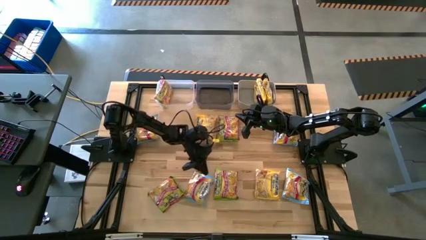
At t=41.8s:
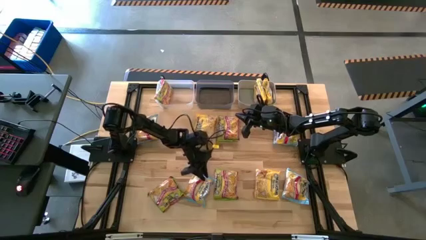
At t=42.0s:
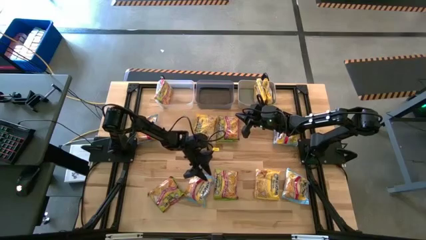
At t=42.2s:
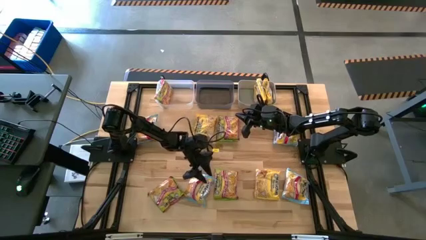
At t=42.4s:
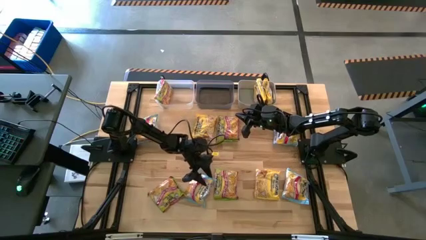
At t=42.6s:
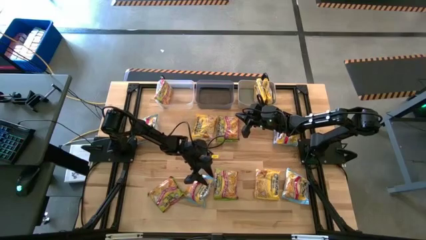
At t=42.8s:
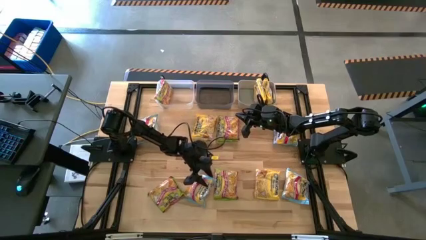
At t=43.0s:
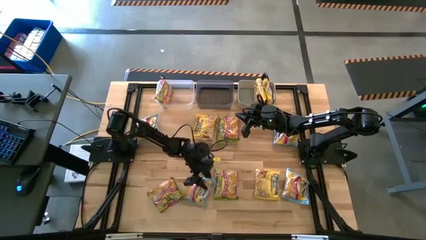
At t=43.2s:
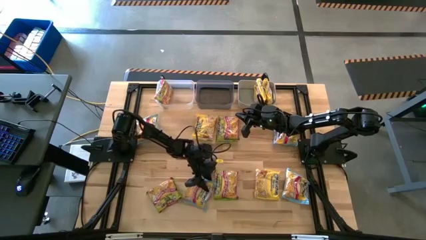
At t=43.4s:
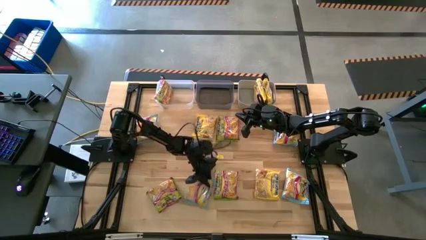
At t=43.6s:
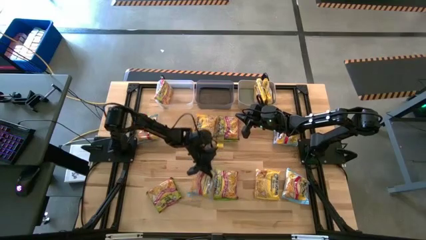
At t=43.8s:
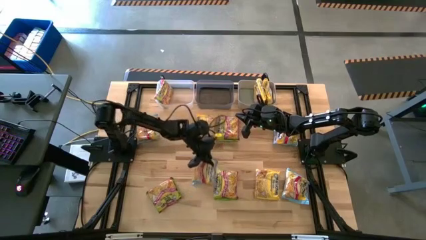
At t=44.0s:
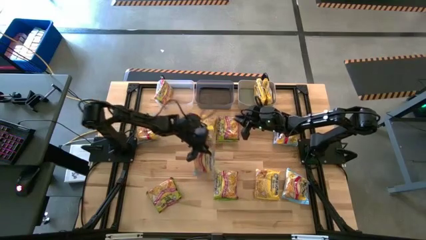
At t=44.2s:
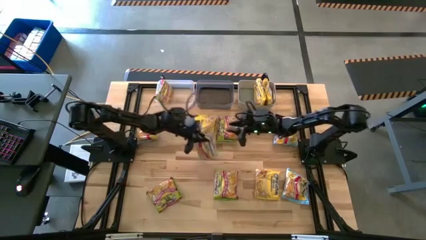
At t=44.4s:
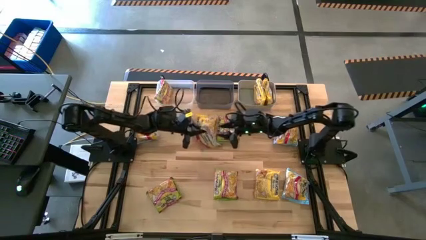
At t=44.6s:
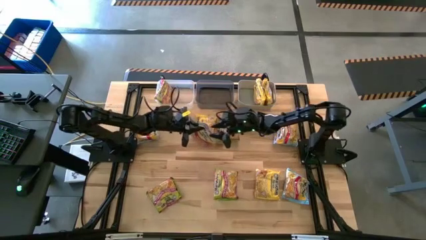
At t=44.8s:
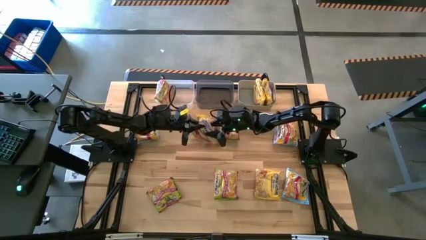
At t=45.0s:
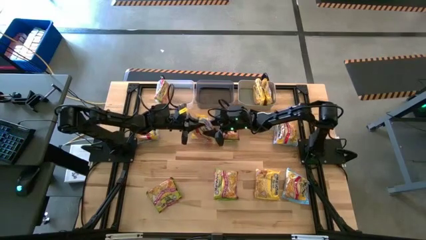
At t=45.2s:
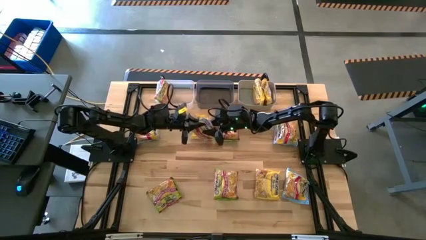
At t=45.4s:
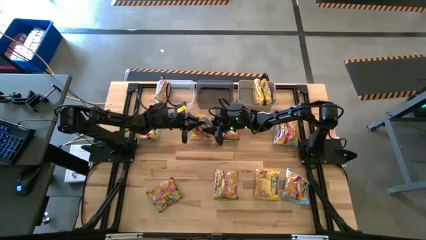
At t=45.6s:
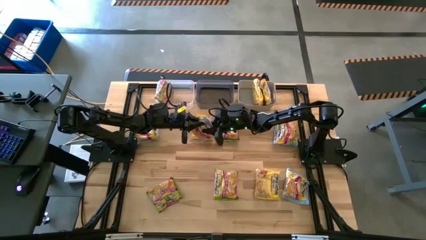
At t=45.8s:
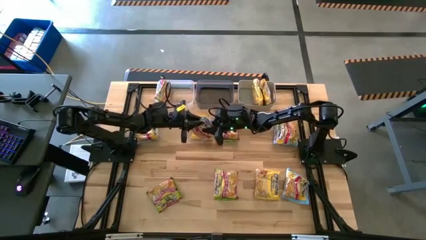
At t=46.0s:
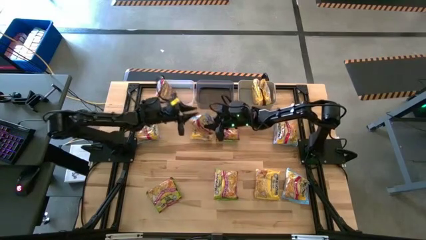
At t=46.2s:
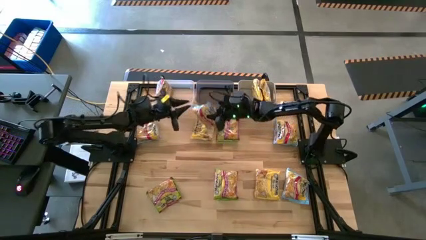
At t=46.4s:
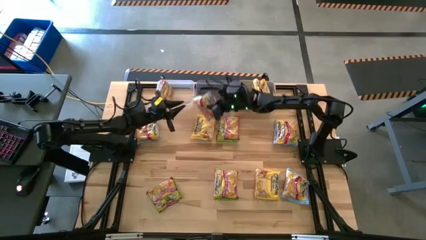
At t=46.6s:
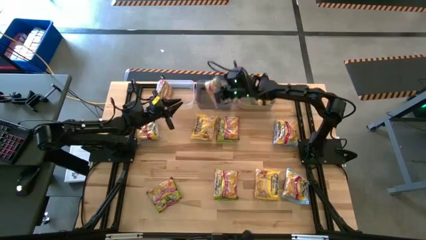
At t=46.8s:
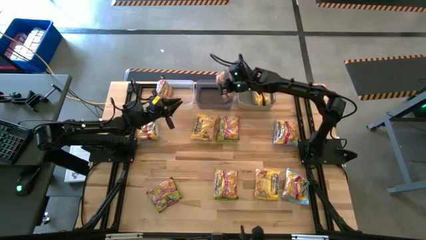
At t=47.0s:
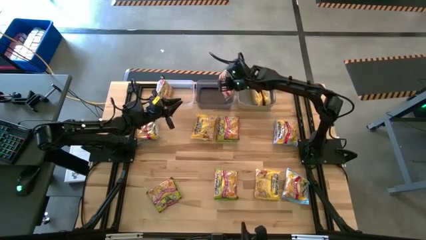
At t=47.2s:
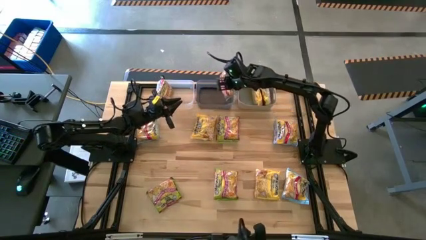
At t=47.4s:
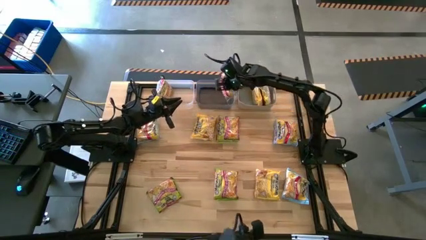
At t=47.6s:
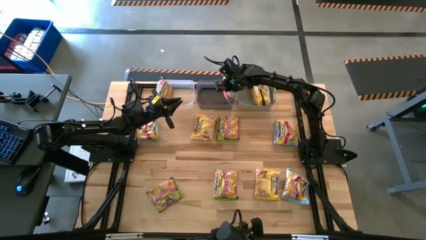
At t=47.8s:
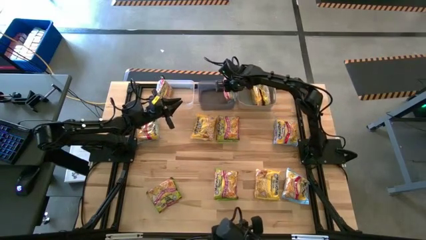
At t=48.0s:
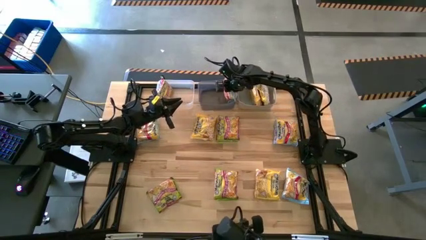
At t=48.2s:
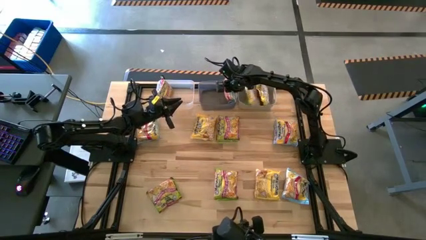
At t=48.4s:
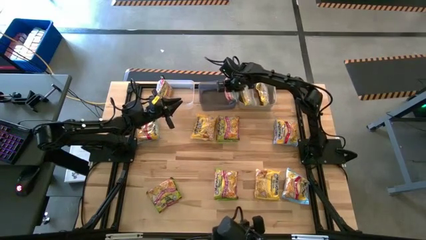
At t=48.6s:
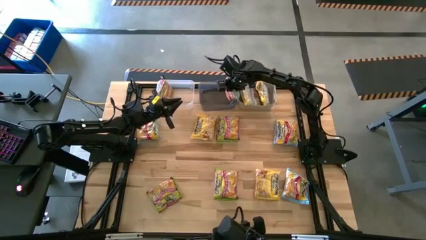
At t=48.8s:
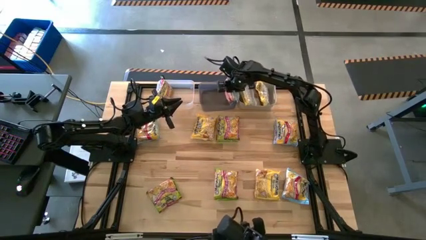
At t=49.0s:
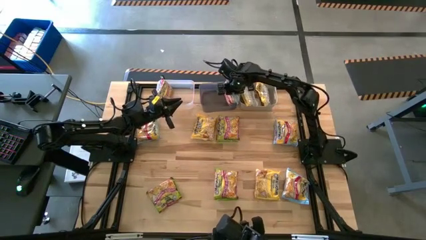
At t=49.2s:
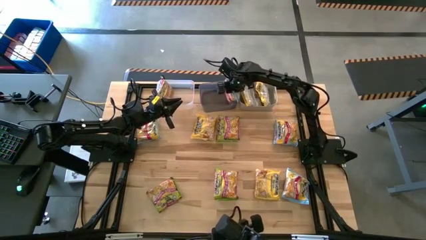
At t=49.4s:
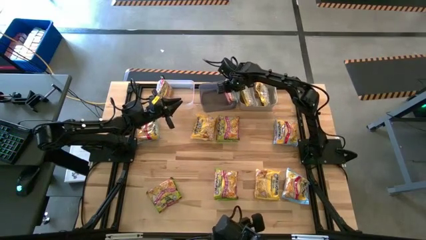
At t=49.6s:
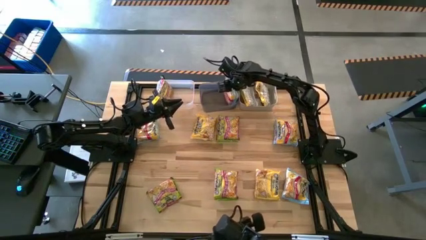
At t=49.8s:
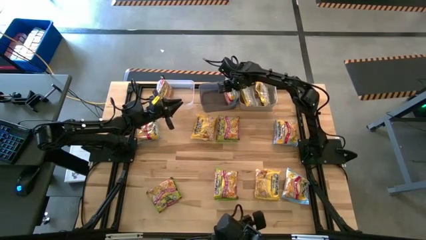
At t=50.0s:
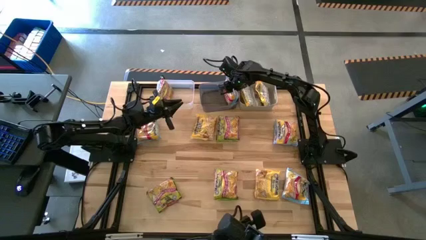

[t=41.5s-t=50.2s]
Task: Sort Maruchan noodles
Put the bottom left blue noodle pack into the black bin

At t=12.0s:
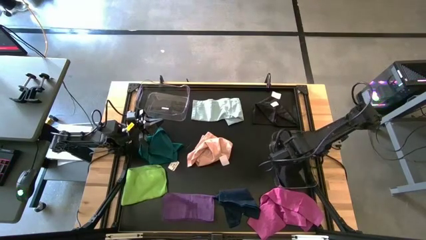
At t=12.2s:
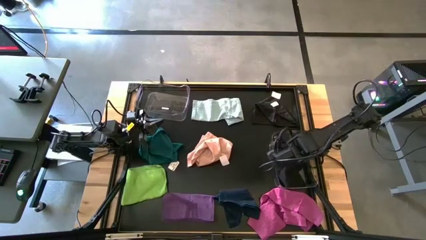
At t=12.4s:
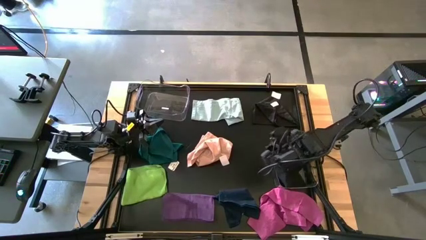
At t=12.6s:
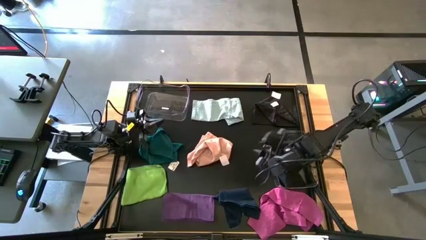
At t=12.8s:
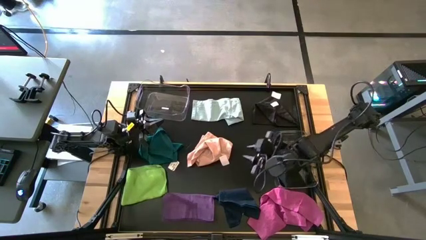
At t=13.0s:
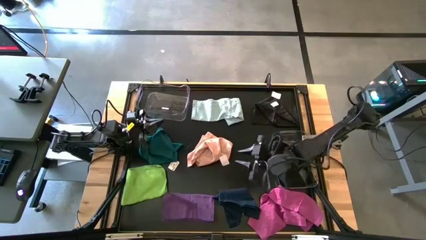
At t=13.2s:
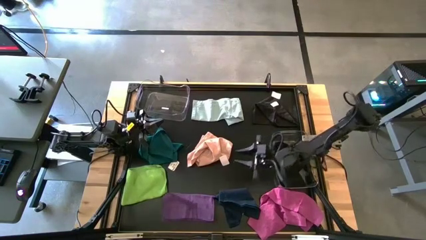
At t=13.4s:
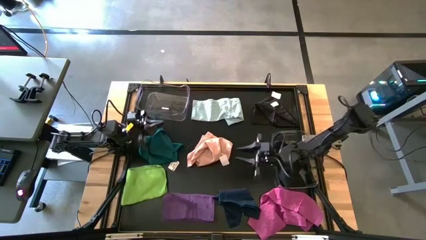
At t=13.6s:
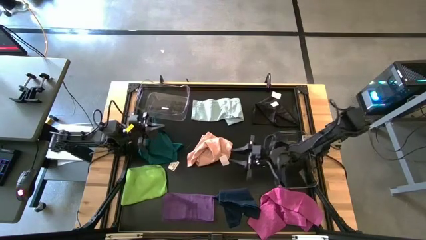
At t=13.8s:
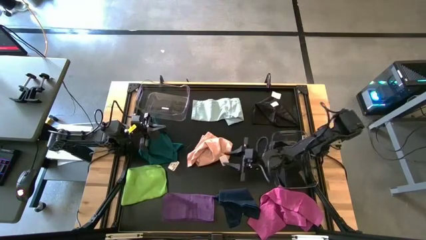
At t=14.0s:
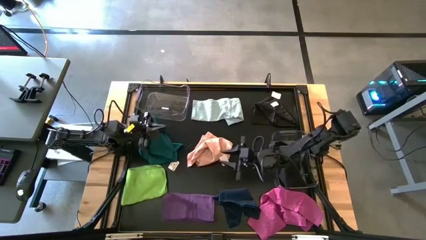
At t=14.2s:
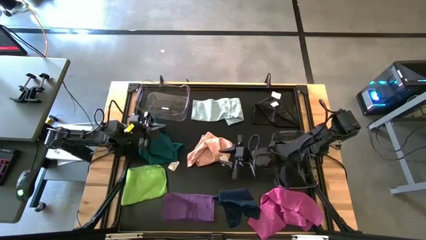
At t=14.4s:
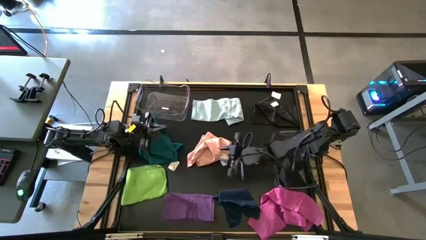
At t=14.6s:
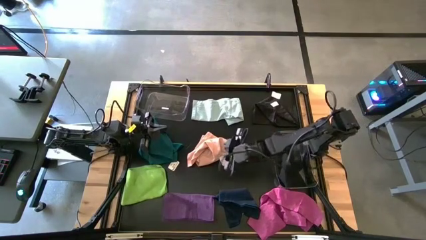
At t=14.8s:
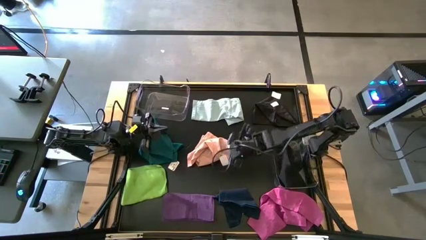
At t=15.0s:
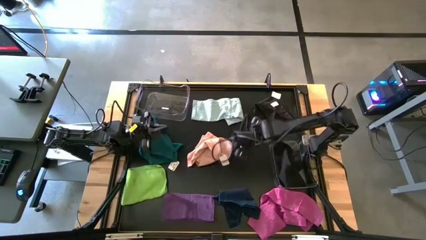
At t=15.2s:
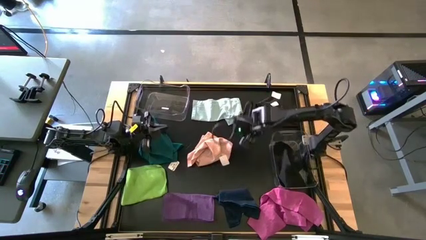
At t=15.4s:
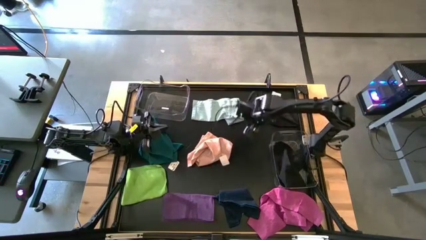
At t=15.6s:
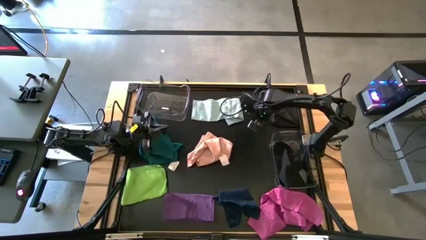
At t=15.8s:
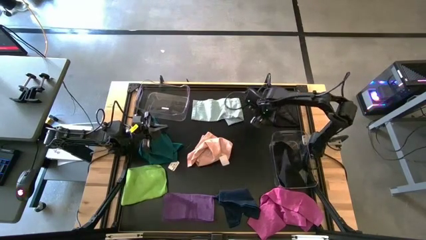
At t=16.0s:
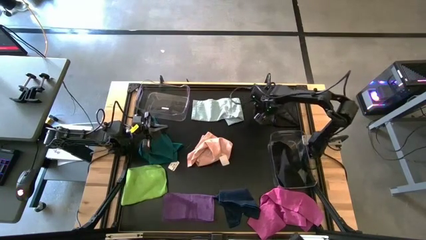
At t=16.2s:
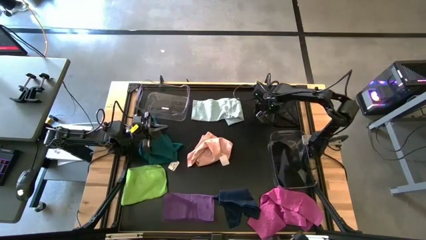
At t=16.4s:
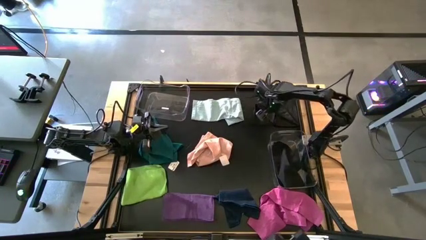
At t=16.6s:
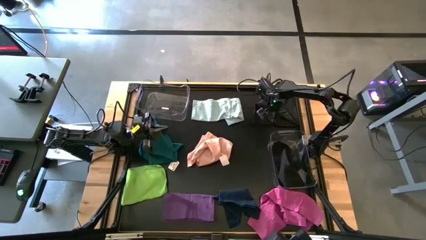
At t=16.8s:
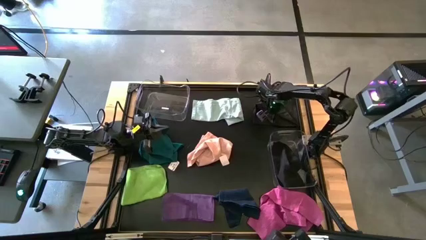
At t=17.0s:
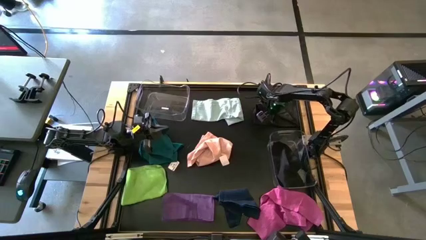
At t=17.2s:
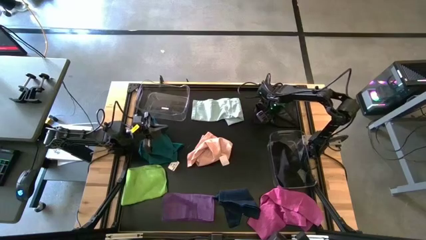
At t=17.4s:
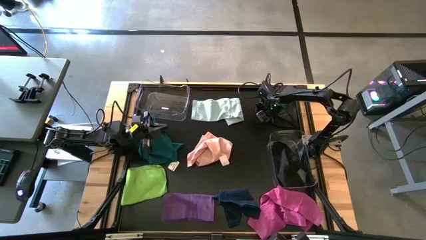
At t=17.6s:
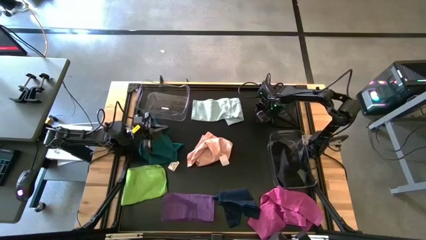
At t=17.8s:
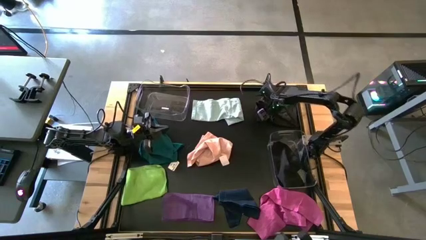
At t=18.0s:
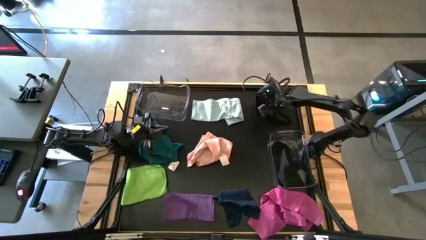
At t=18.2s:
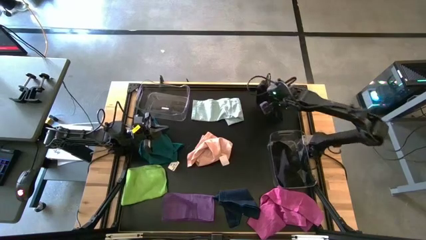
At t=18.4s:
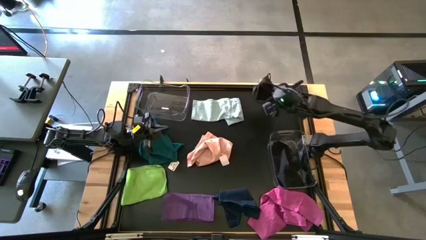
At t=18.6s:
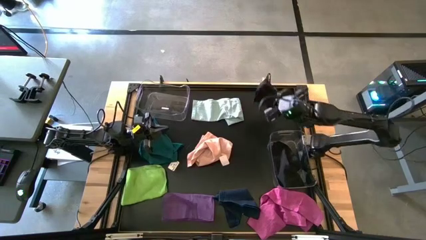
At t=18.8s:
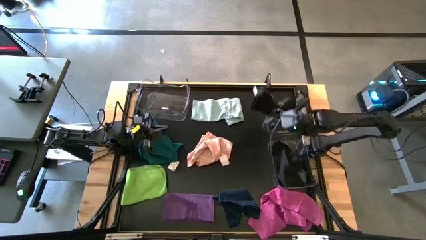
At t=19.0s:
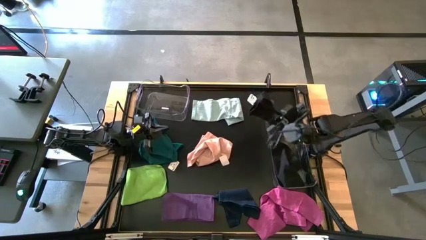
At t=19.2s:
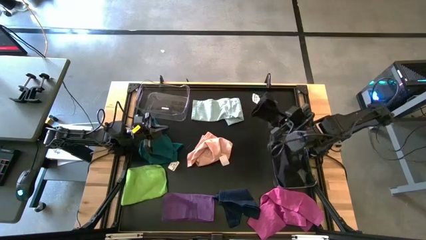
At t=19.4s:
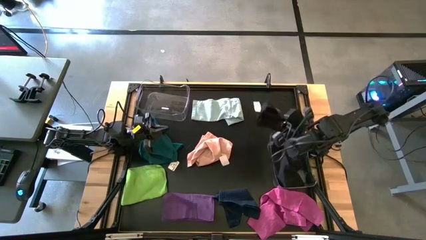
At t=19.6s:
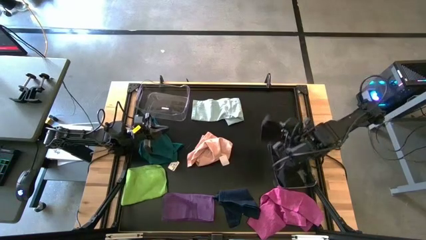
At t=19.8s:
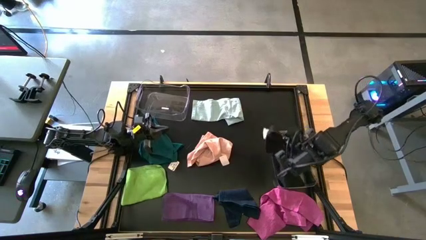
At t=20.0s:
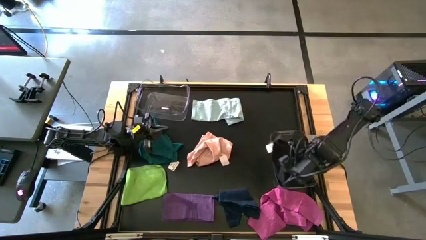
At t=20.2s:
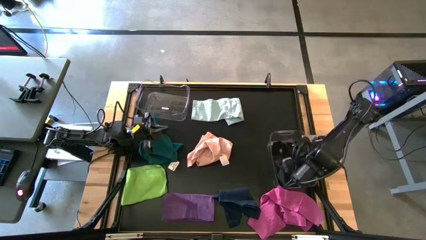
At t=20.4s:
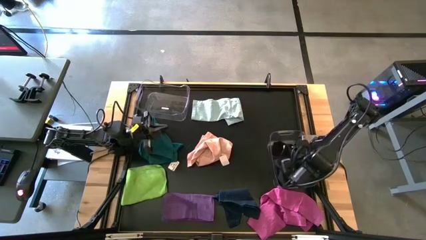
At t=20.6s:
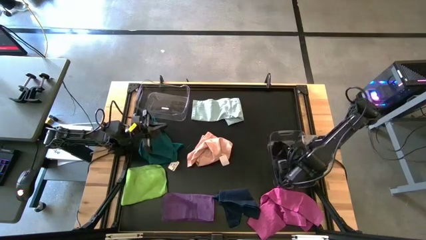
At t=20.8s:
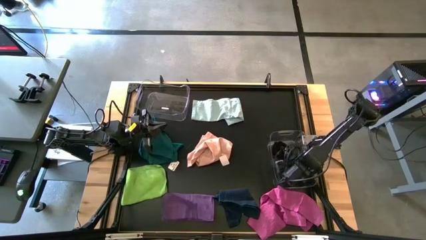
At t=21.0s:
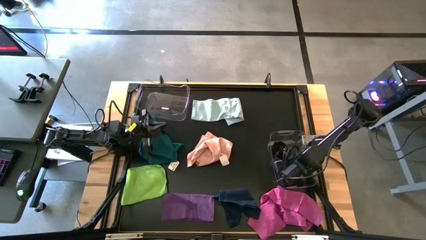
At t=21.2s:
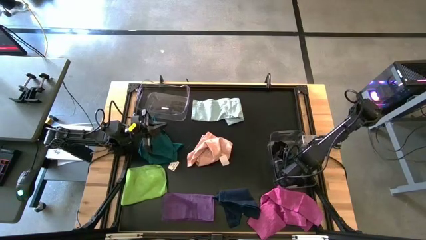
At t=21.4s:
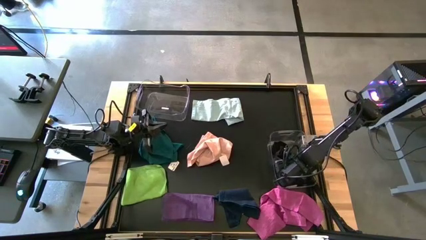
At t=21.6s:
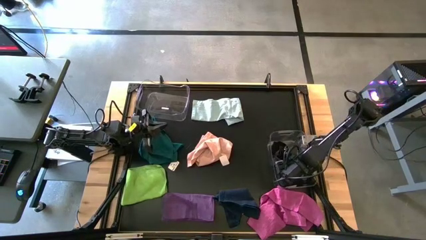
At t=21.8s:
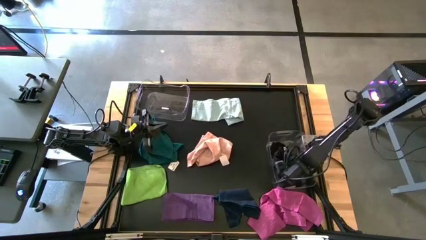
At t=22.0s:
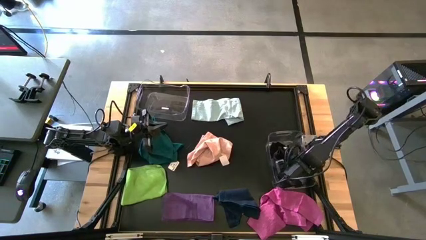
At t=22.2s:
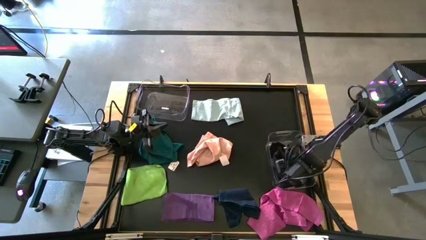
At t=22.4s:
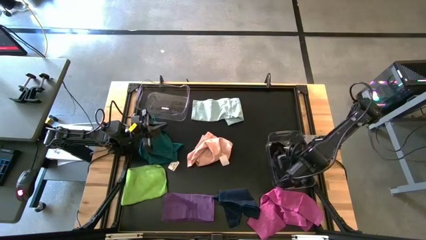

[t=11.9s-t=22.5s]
Task: Sort towels by color in basket
Put the black towel into the bottom transparent bin
